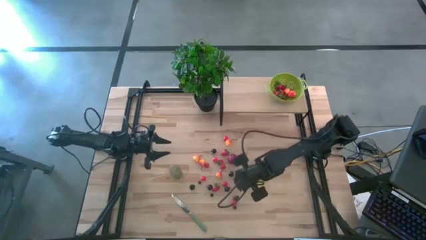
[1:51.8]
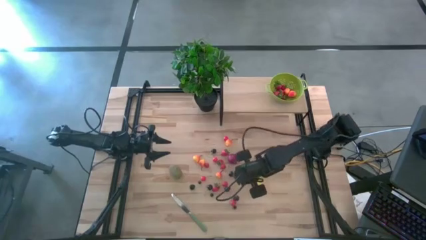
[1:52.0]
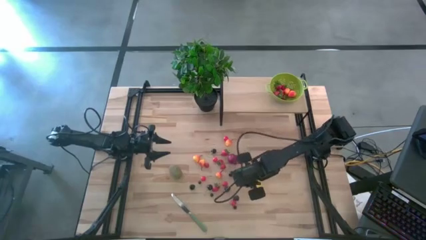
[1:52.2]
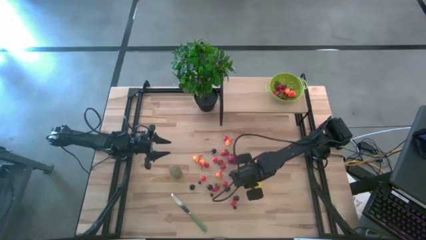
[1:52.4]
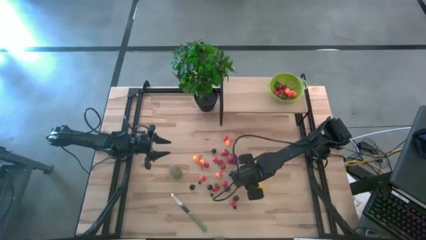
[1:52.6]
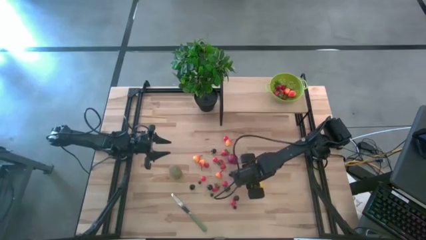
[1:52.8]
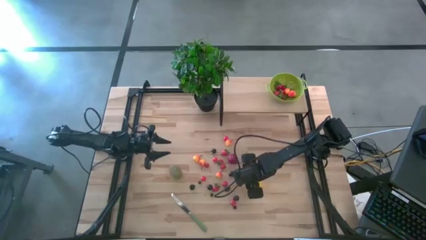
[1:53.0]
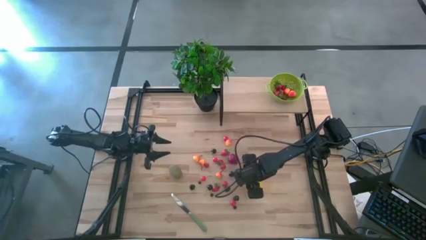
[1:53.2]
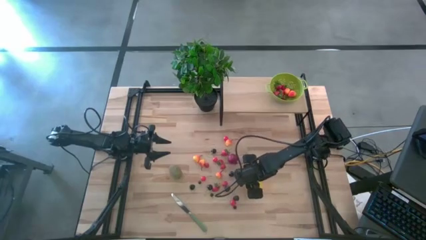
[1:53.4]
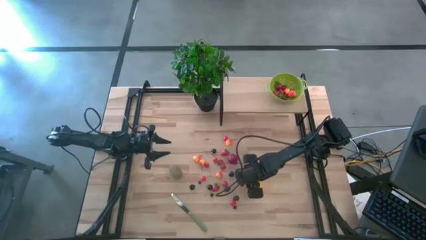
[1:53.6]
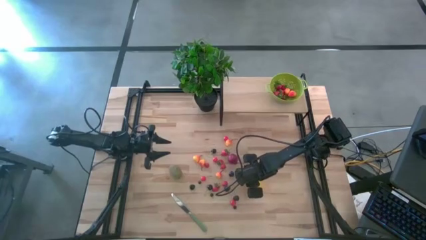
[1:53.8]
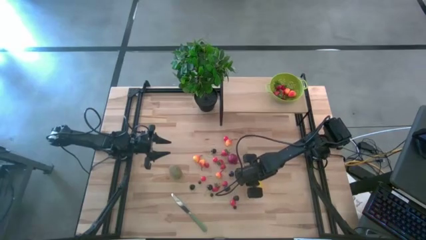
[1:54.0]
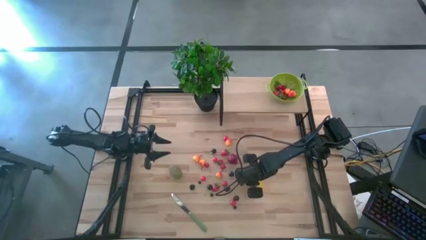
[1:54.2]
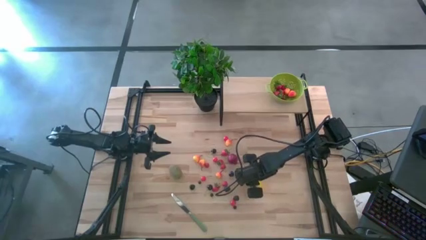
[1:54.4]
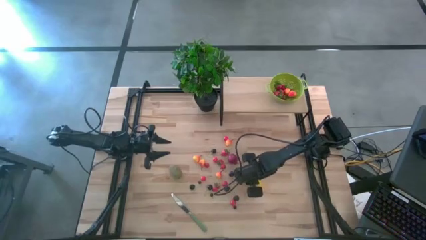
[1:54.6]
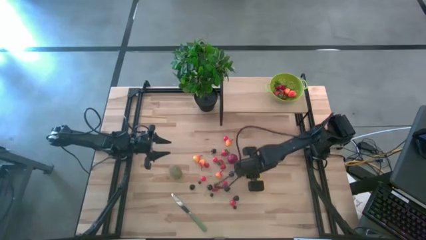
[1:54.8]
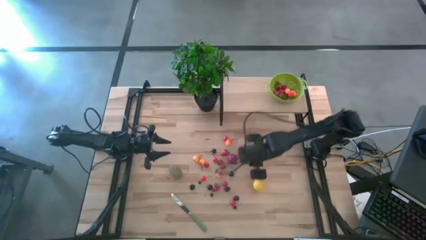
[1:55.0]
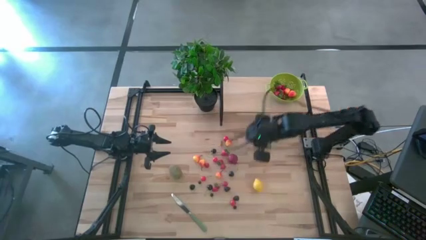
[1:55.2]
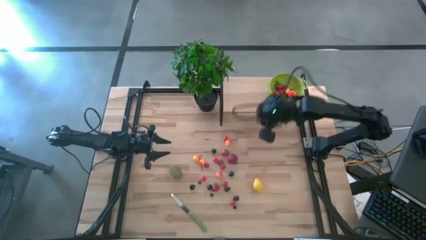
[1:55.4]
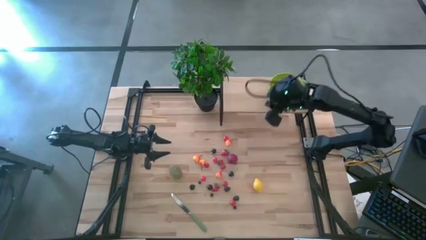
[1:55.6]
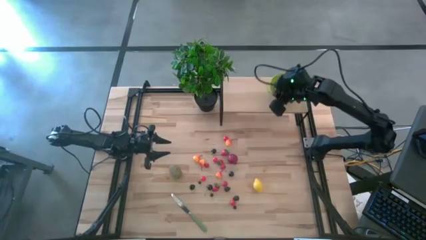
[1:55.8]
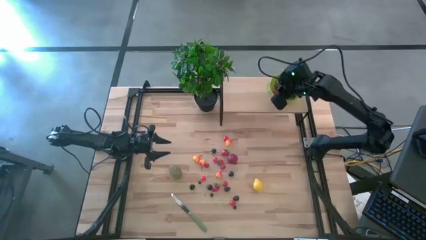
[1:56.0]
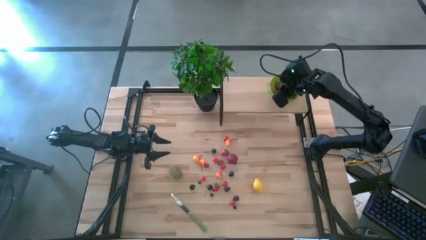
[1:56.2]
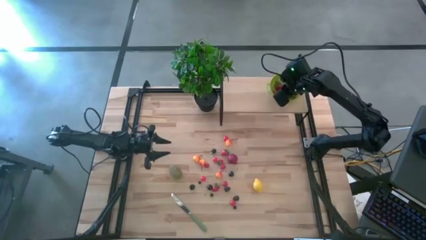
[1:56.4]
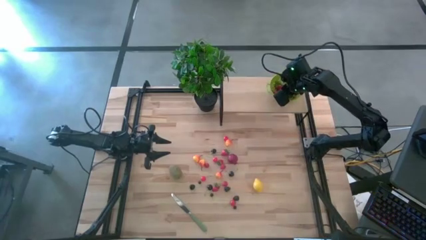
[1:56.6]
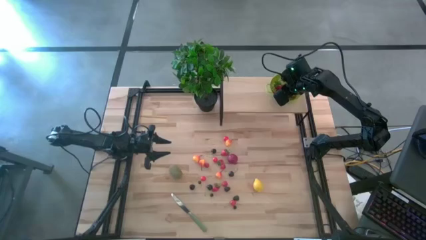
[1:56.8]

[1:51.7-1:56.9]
Task: Pick & Place Fruit
Put the blueberry into the green strainer bowl on the shelf

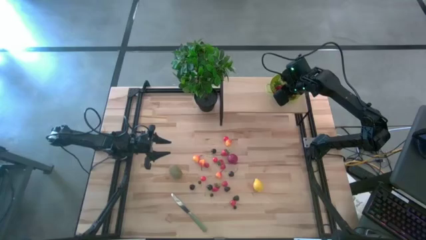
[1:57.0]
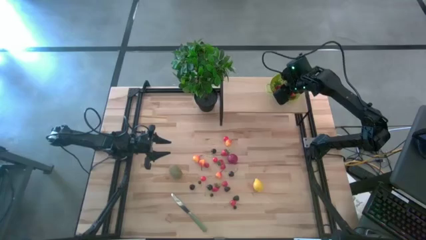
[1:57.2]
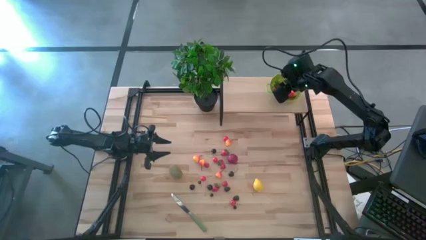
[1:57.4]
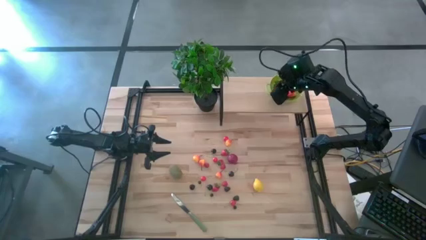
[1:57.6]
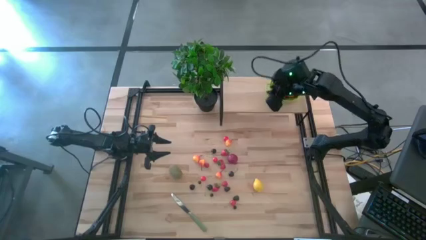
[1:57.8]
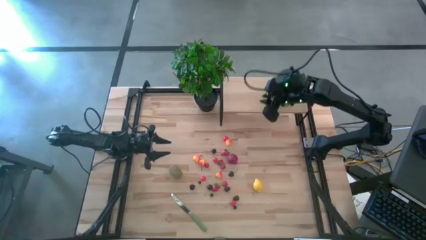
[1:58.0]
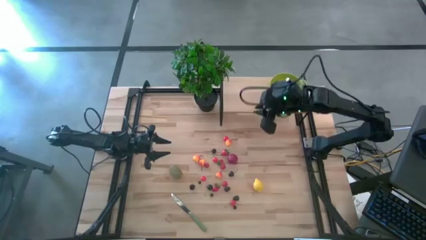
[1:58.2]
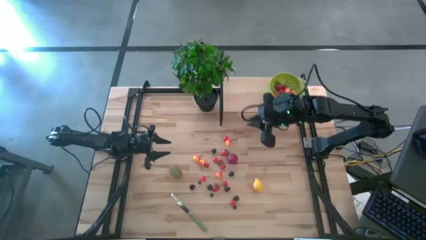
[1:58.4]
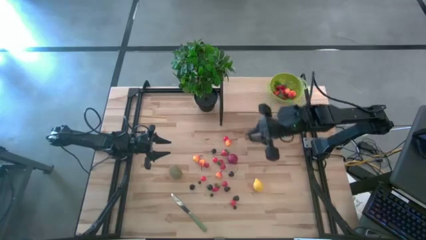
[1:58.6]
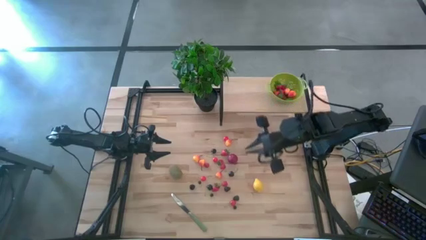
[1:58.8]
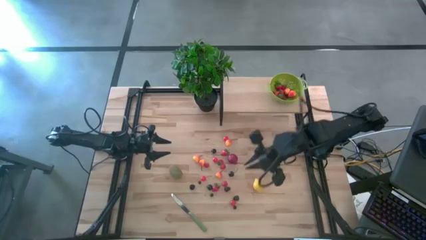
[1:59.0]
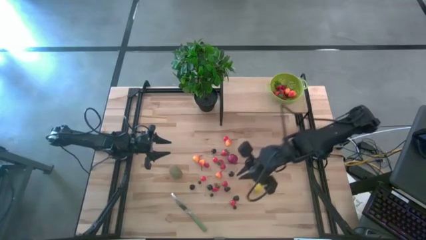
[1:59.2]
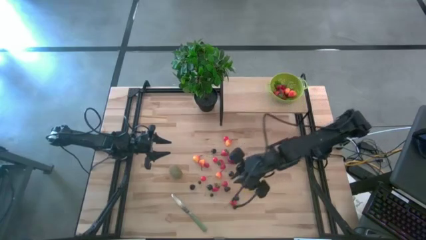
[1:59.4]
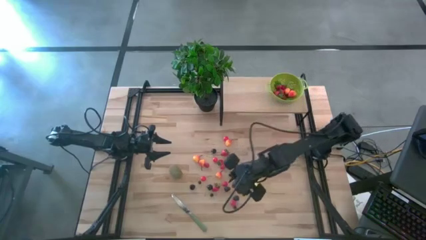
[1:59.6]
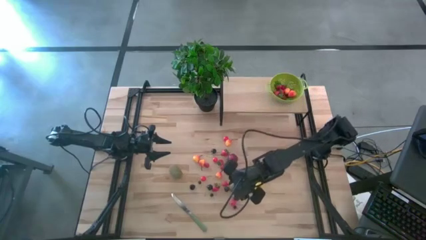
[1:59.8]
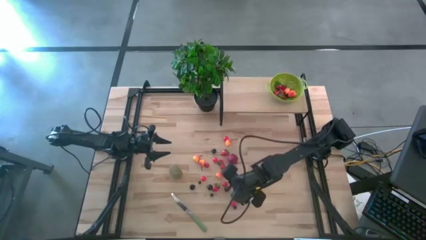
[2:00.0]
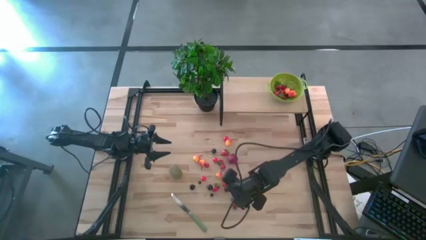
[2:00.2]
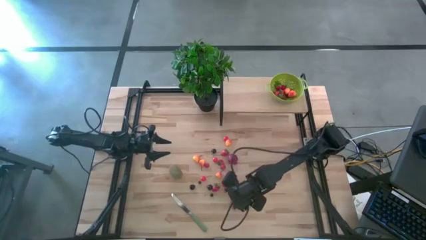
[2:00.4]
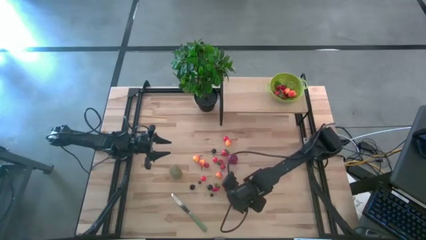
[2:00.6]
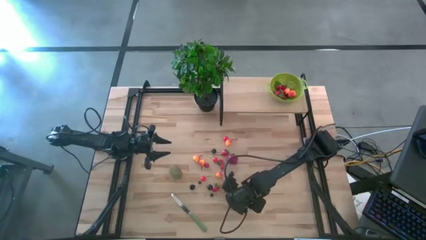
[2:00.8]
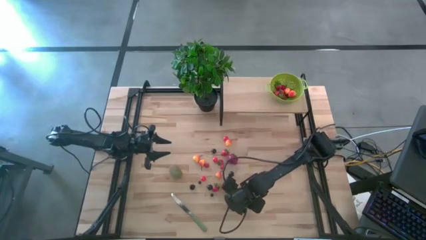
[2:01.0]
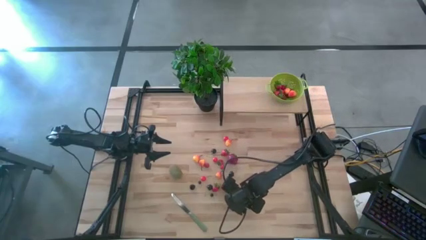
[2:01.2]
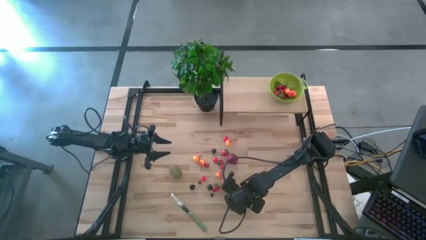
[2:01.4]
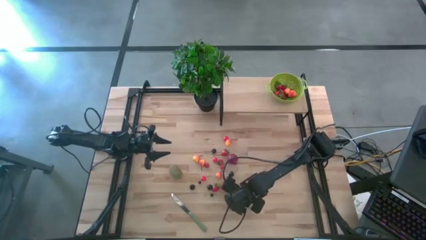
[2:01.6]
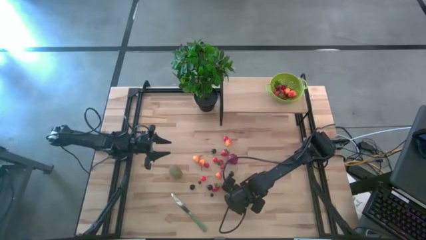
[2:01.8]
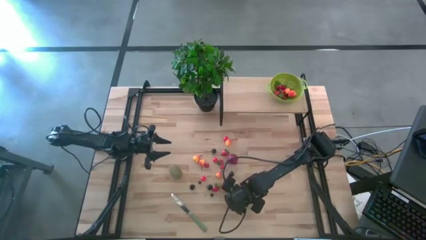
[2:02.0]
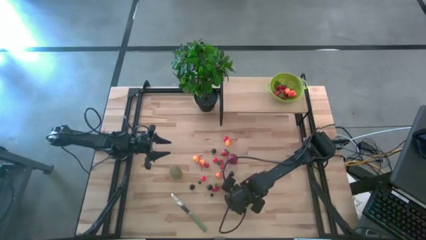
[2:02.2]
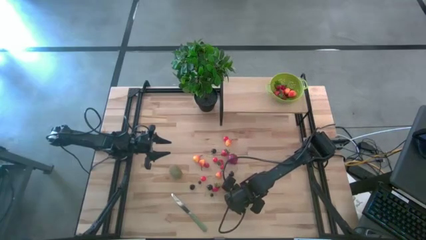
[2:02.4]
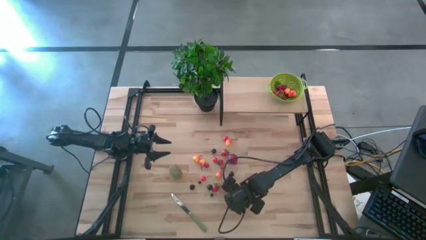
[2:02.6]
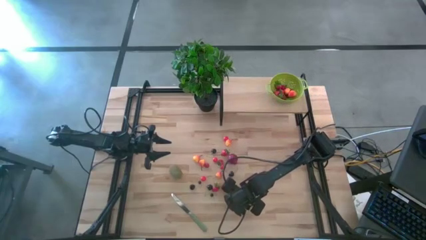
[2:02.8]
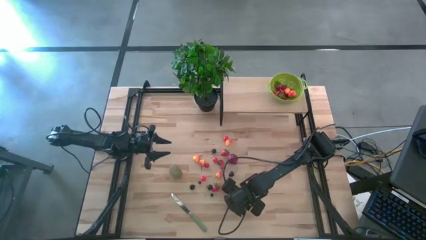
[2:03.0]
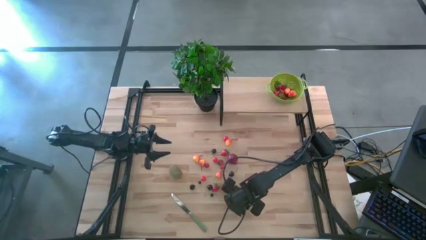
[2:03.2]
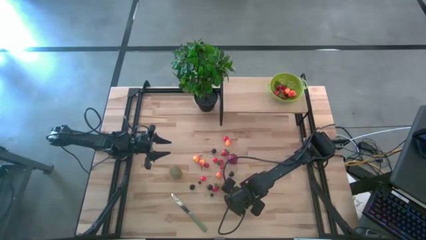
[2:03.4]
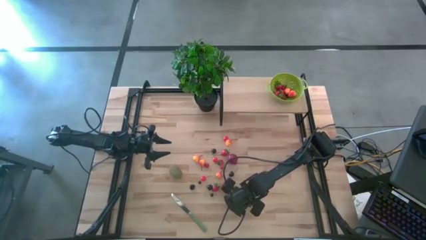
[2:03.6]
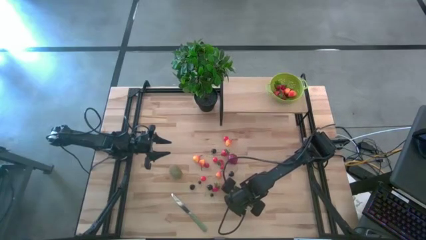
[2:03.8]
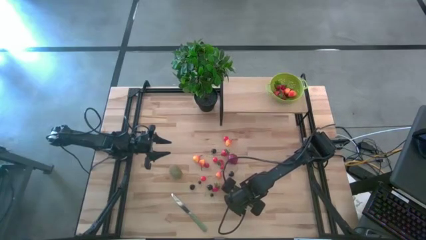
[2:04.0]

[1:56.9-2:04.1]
Put the blackberry into the green strainer bowl on the shelf

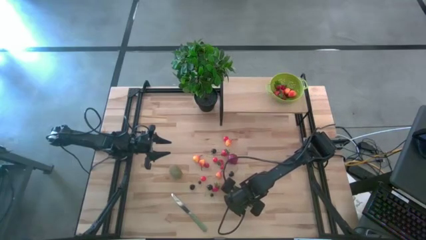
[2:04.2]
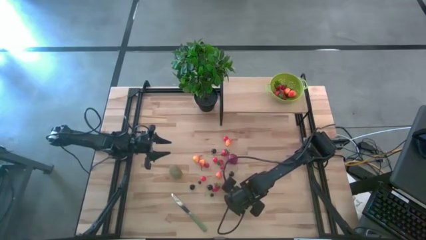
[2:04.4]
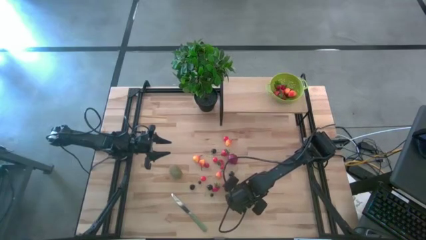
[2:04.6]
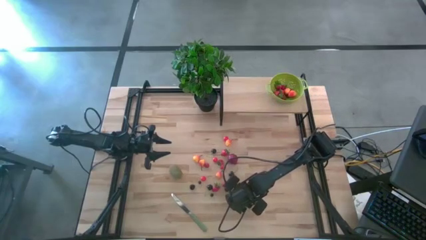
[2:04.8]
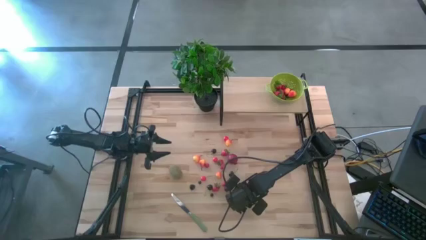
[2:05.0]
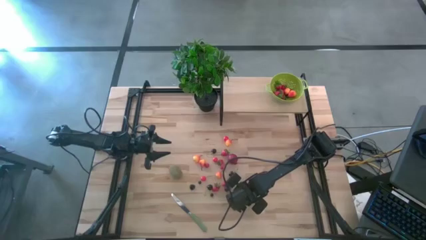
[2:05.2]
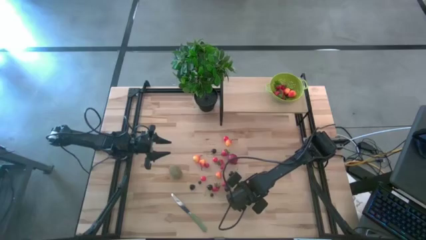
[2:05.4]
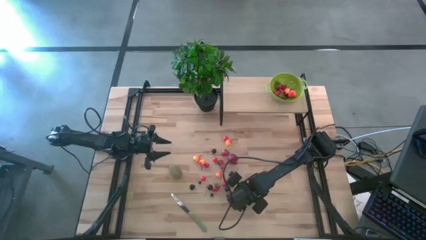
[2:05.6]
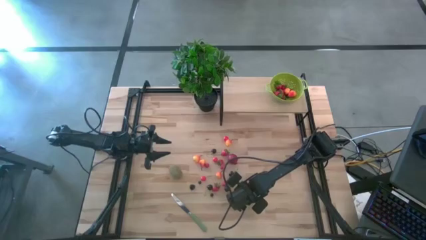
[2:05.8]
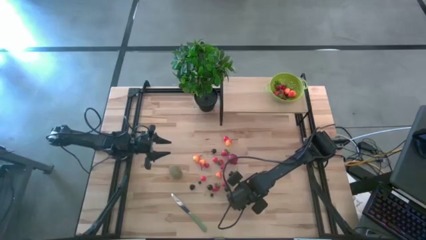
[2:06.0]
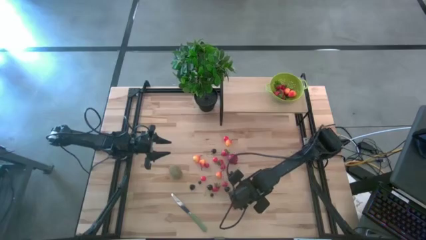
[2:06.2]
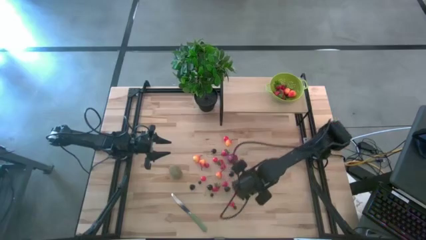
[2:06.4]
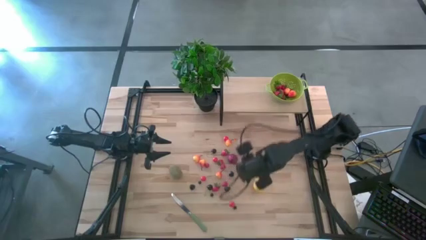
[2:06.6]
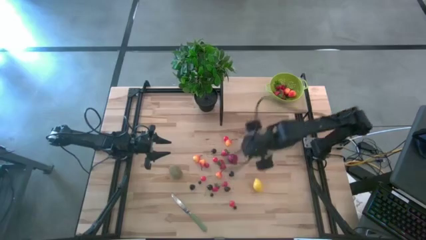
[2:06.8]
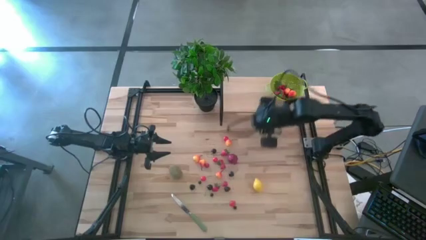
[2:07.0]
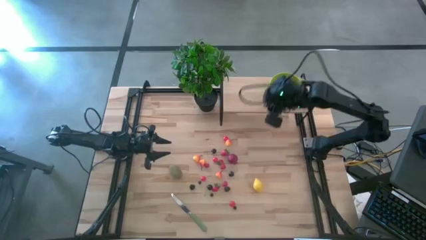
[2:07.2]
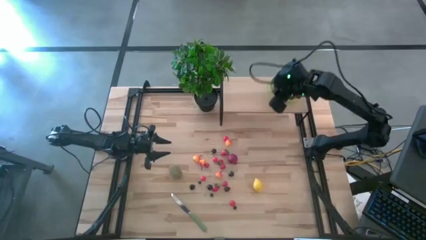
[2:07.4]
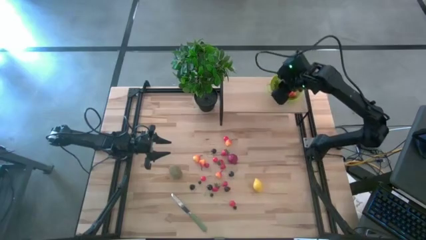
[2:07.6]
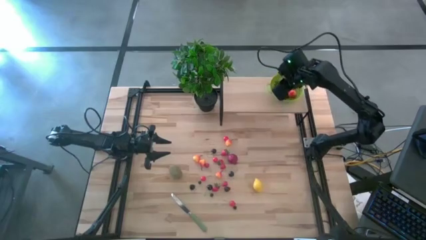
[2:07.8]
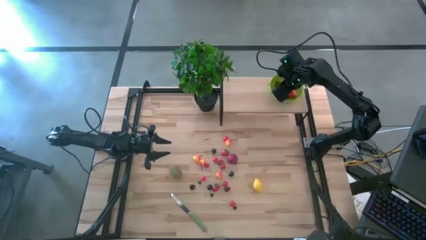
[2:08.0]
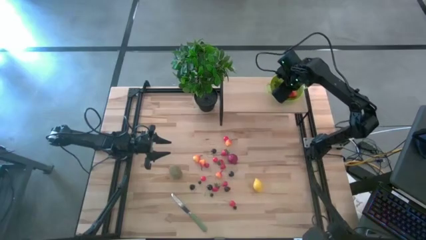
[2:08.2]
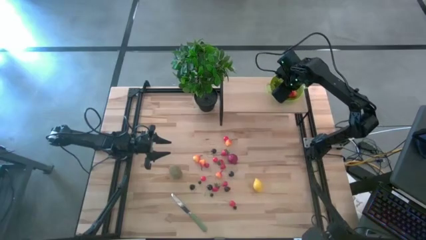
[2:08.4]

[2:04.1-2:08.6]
Put the blackberry into the green strainer bowl on the shelf
